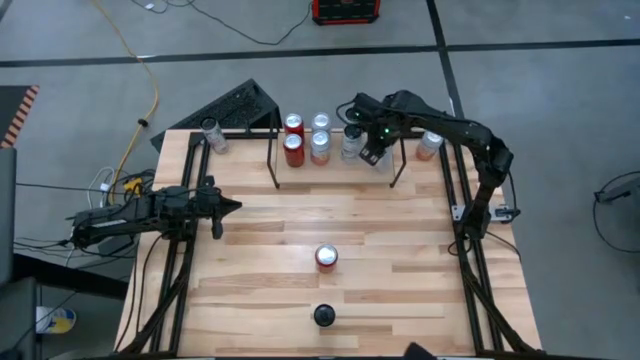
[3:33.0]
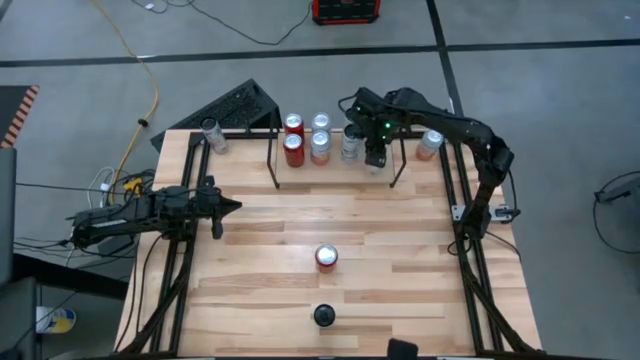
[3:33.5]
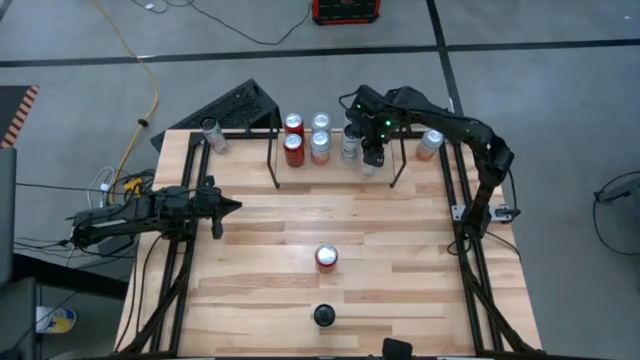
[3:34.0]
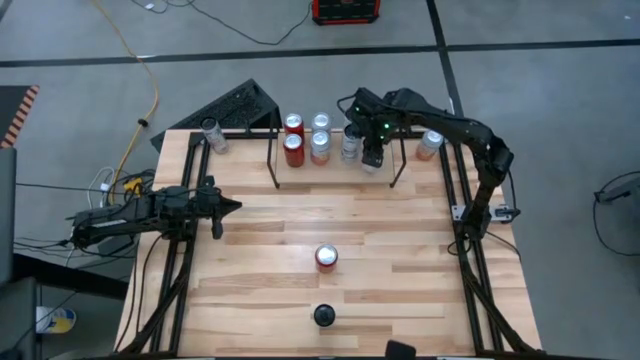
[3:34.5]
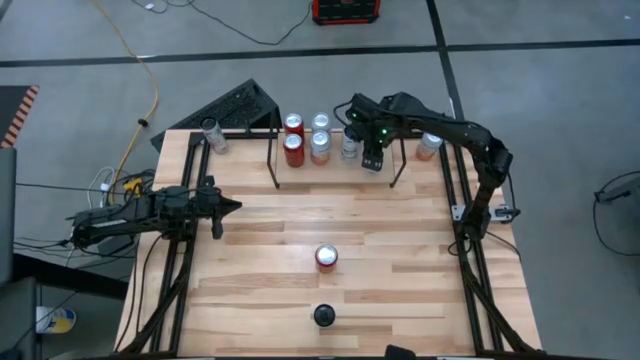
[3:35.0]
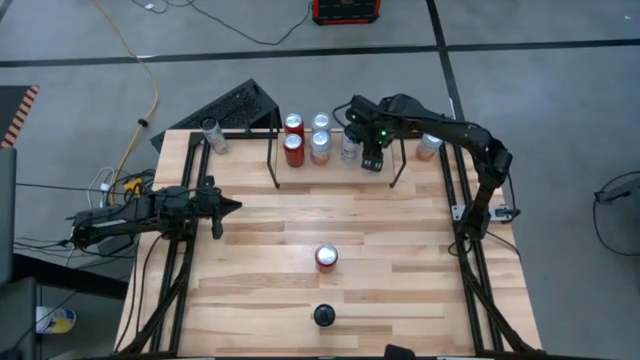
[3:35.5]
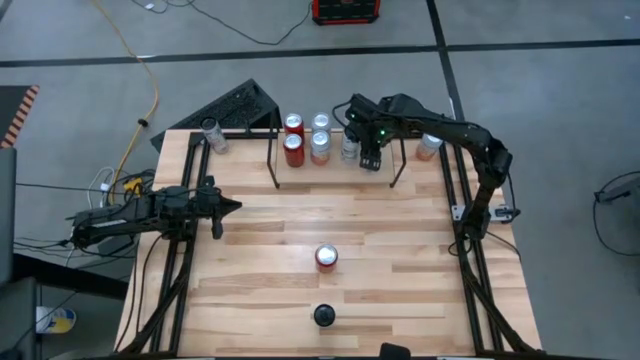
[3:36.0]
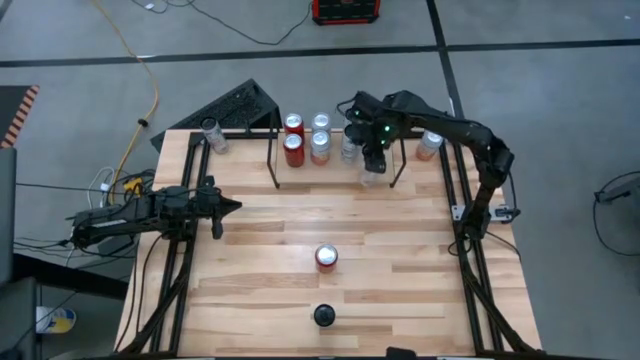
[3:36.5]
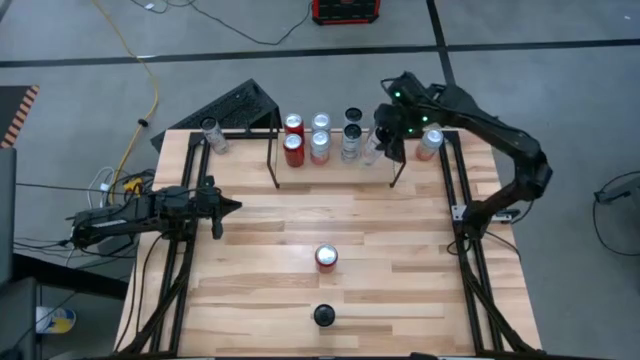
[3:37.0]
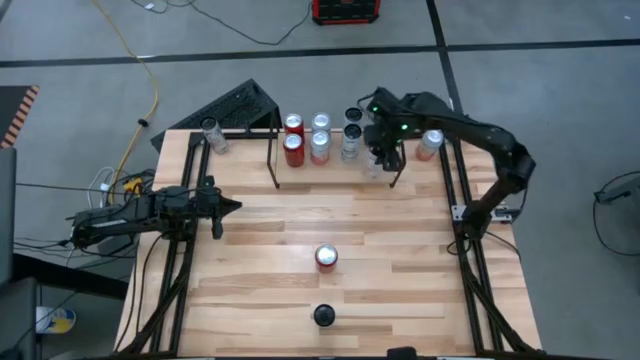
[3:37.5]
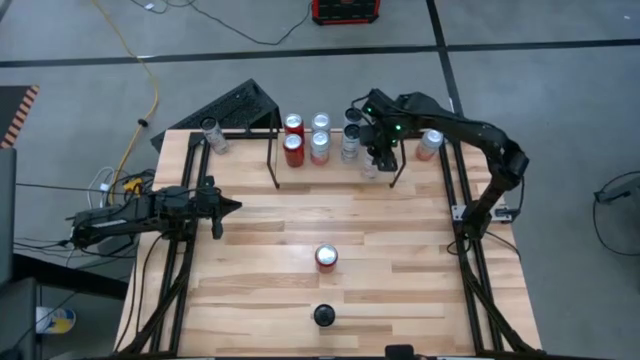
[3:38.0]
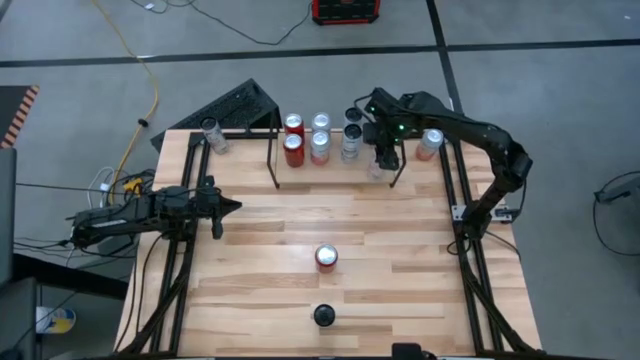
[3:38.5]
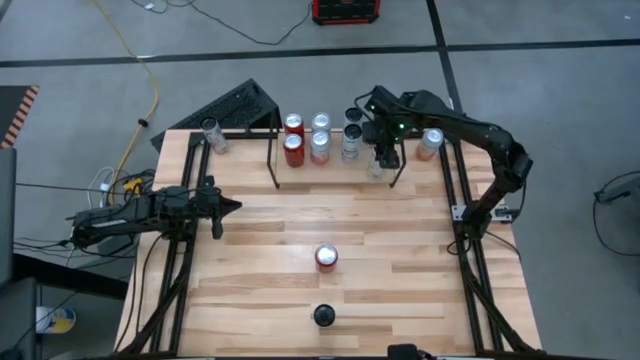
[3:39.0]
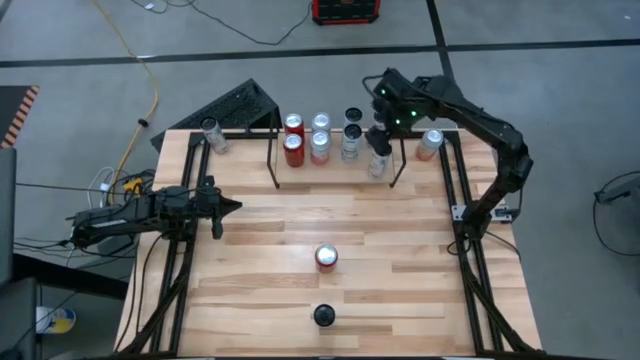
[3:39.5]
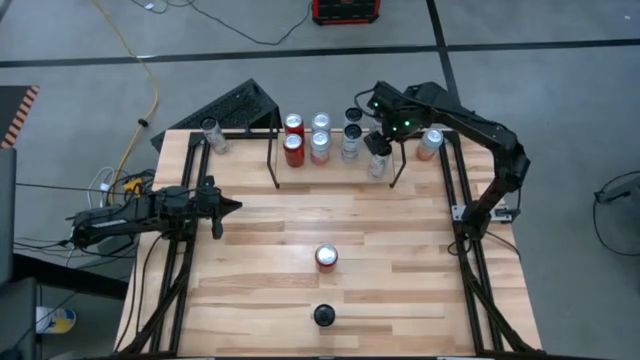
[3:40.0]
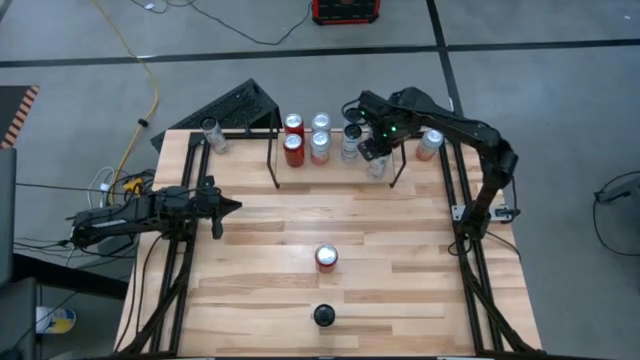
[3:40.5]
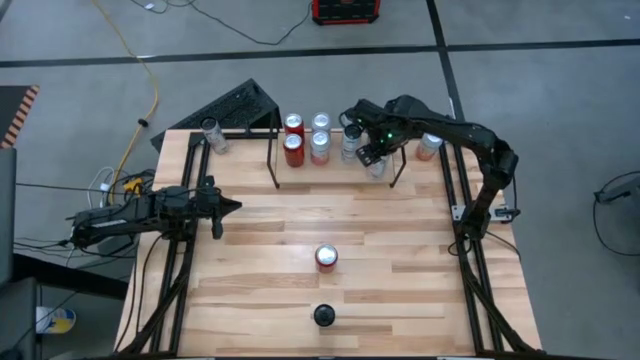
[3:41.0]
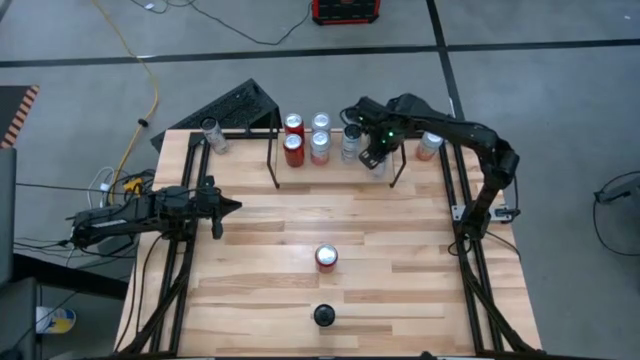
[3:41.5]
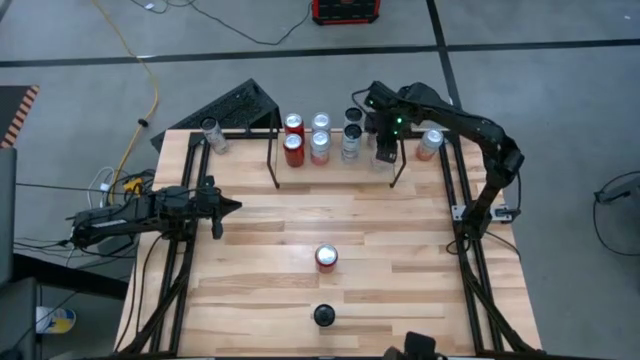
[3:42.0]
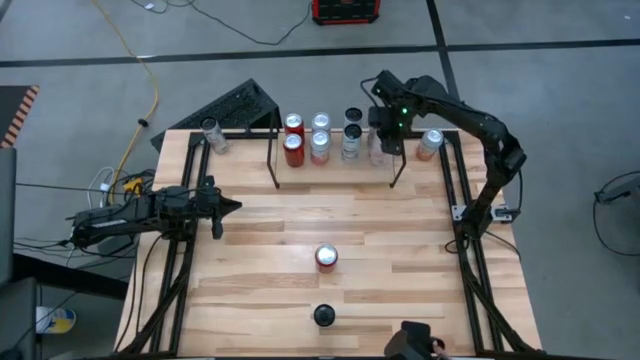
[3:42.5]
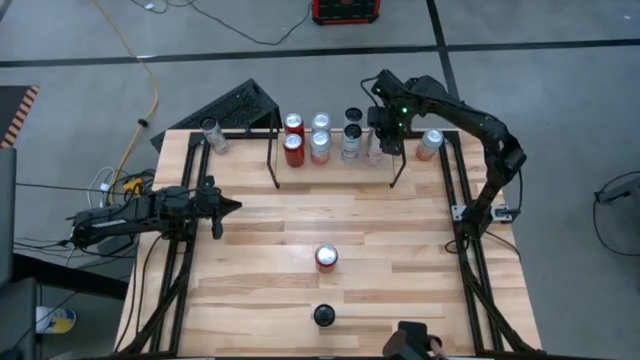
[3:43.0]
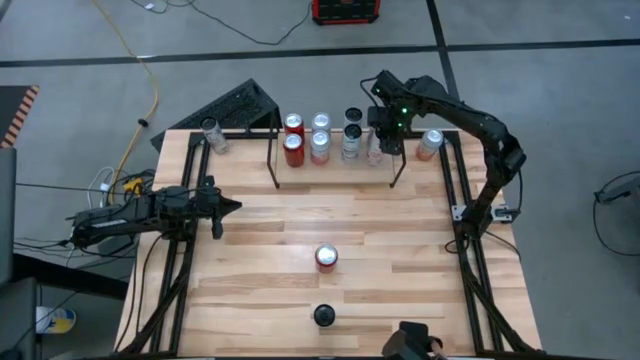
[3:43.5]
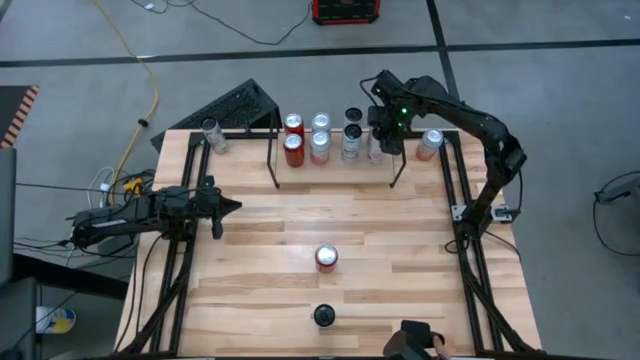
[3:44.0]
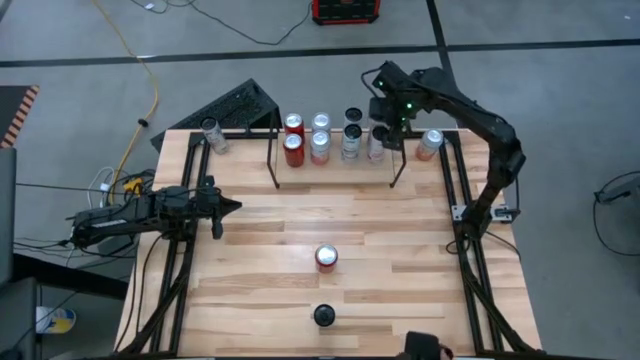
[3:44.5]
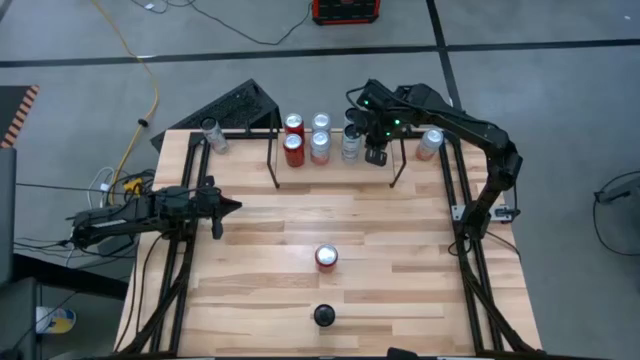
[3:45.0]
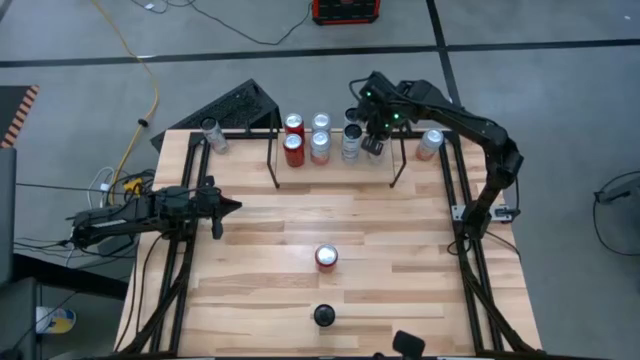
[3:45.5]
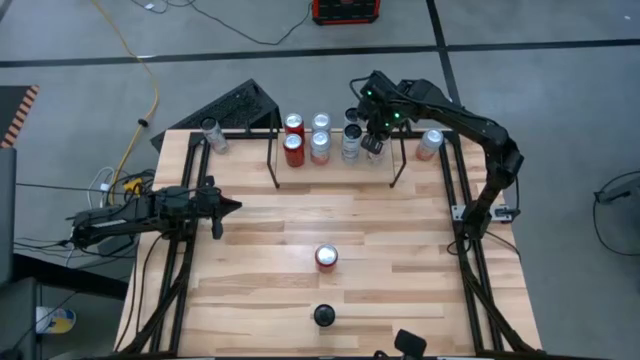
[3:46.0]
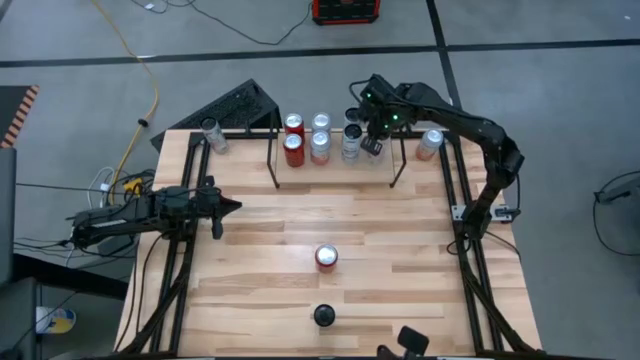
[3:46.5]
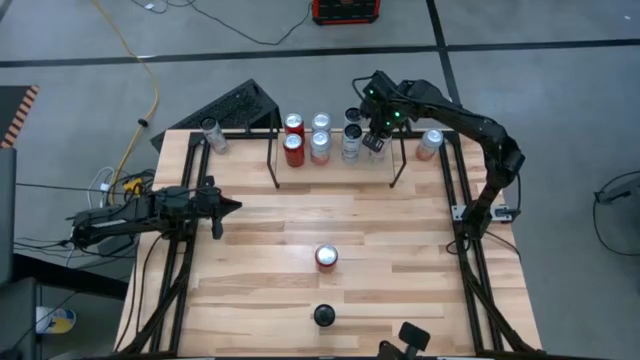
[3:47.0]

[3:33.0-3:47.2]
Task: Place canned beverage on shelf
Put the bottom white pink soda can on the shelf aligned with the other white pink soda can
